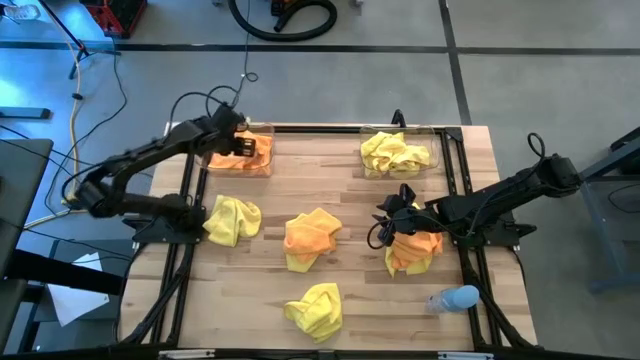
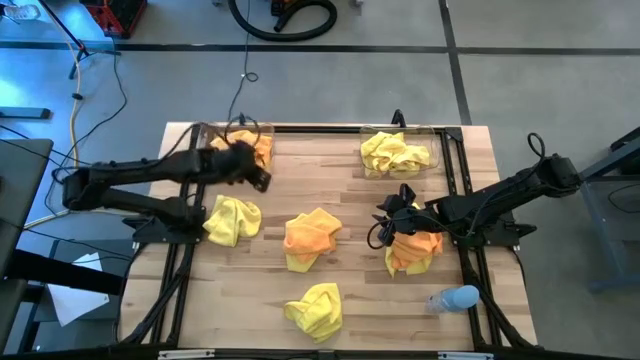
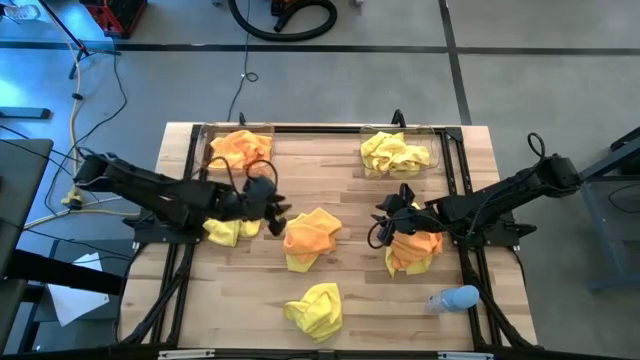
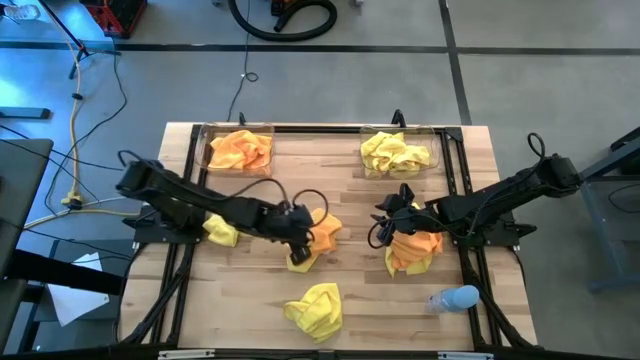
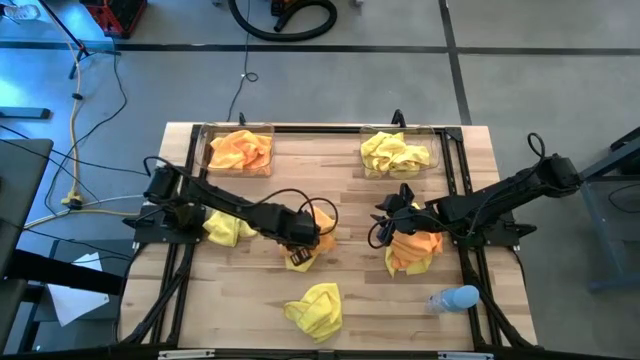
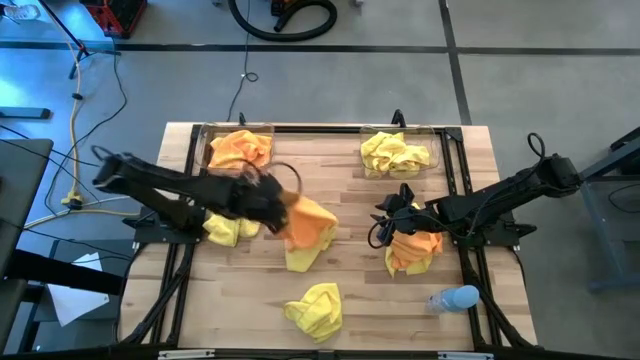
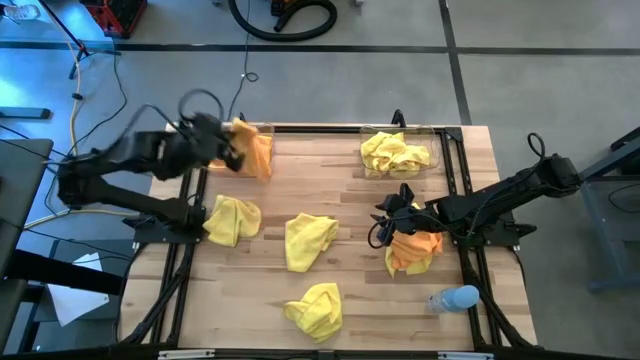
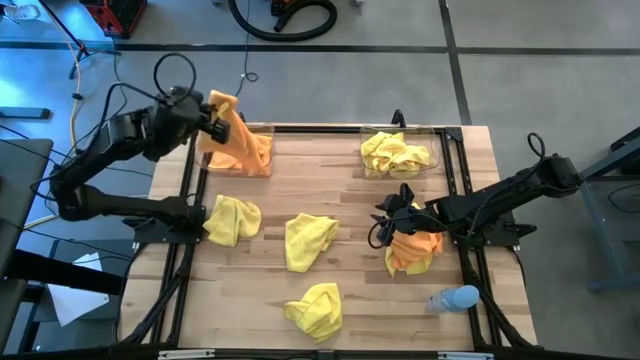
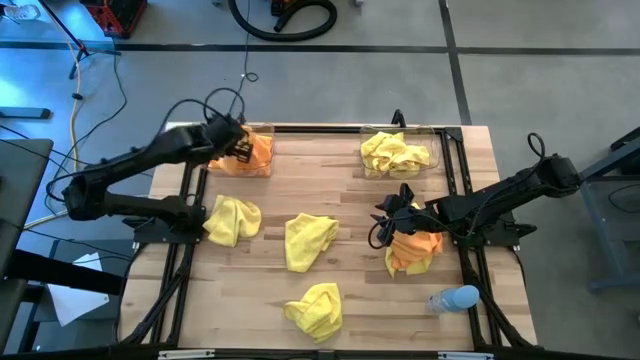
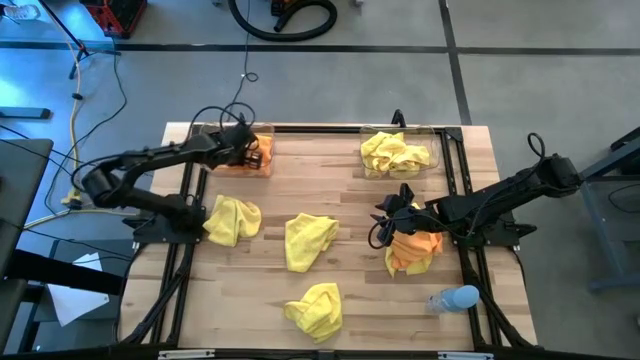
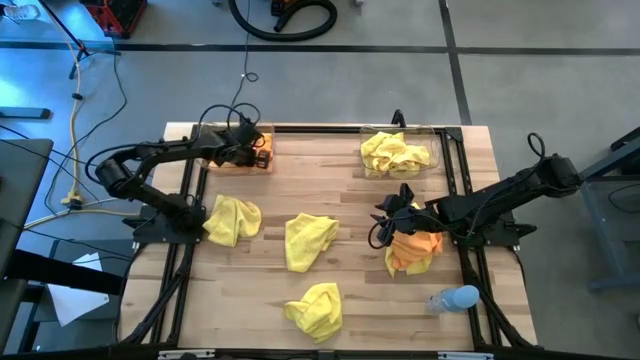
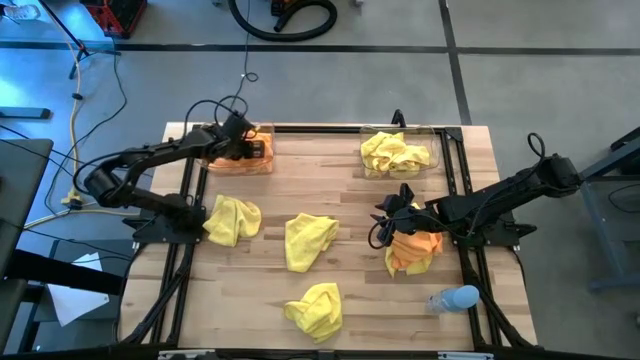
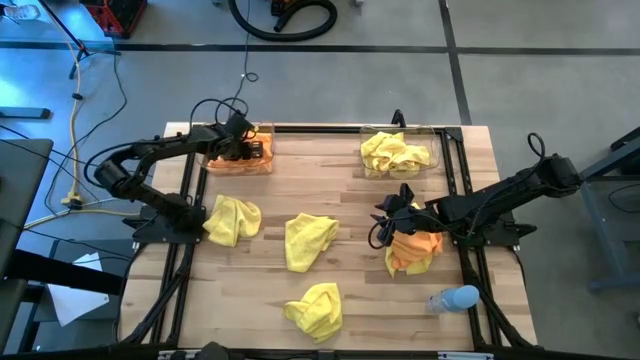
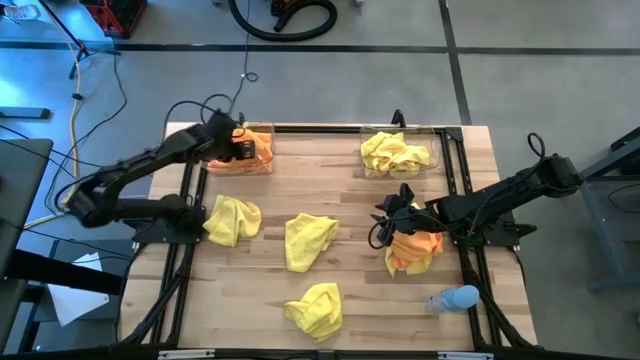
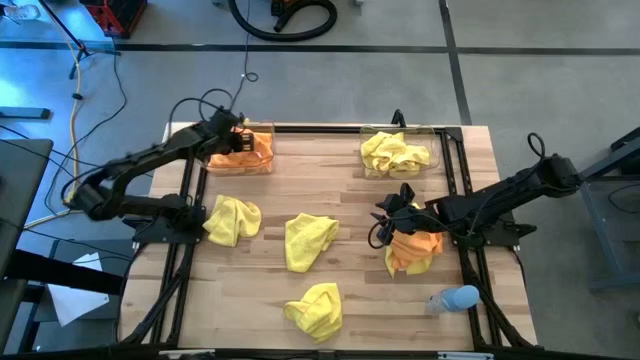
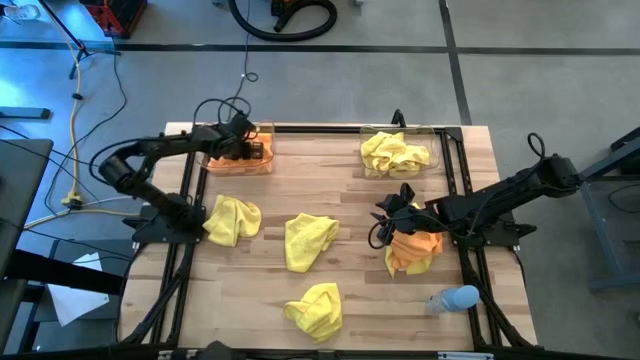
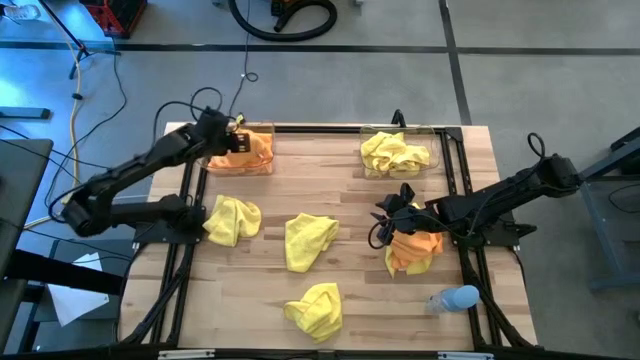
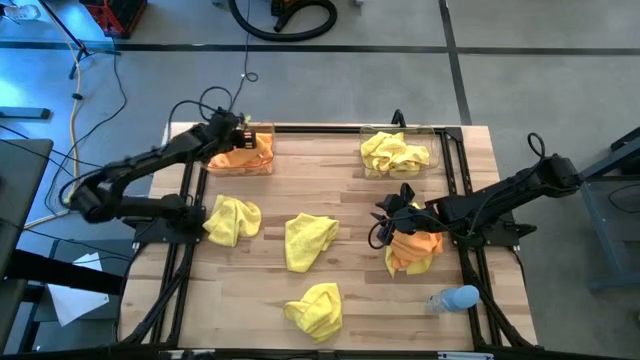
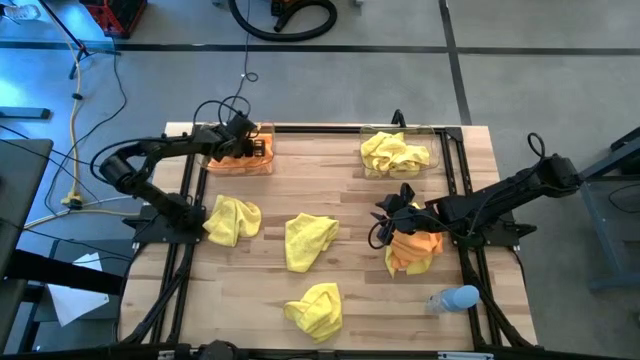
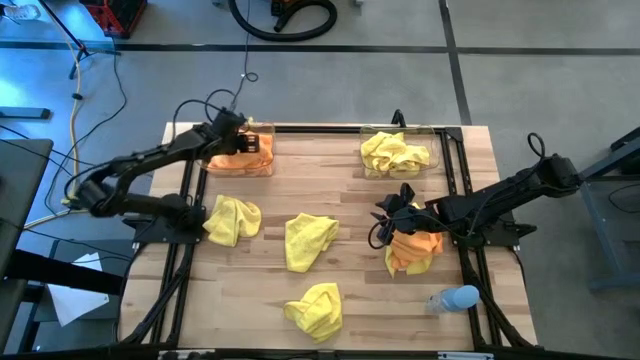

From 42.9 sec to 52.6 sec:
Task: Sort microfiber towel by color & place in baskets
Put the left orange microfiber cloth into the left transparent bin

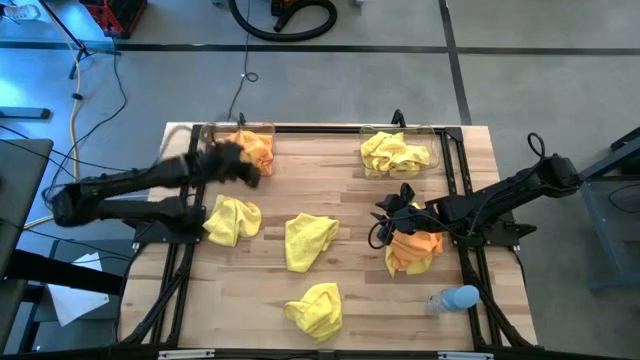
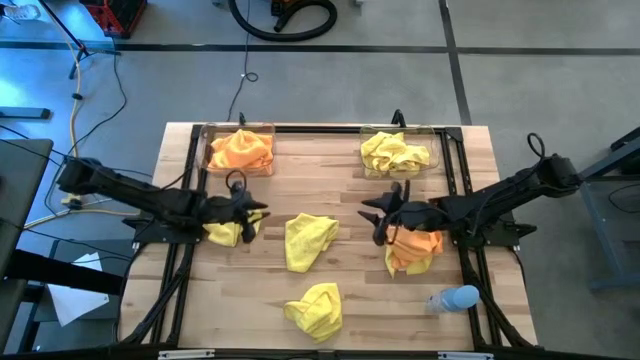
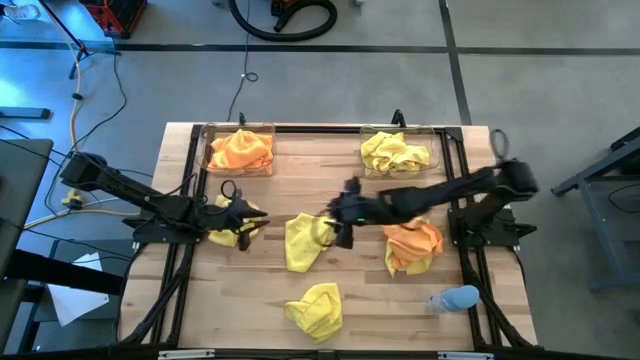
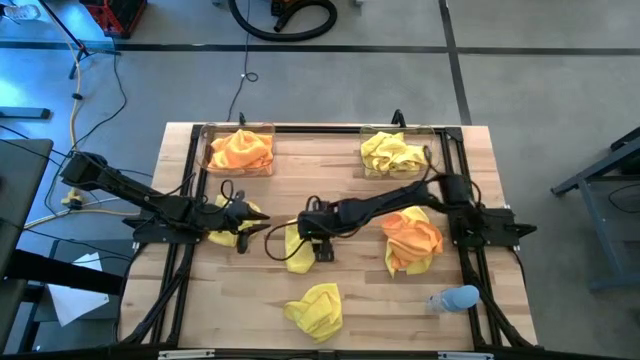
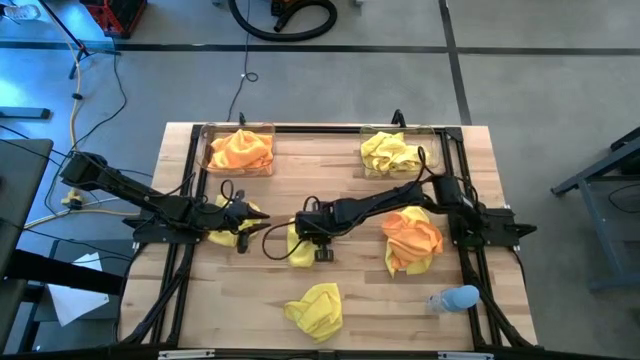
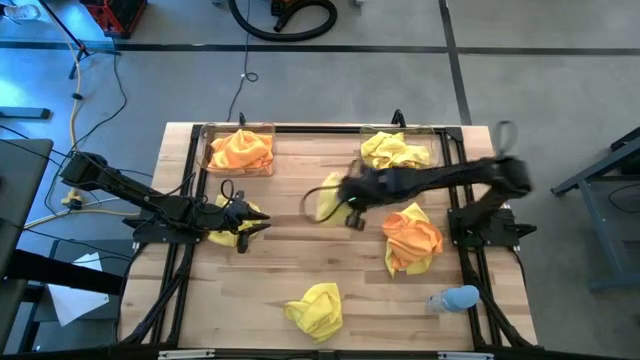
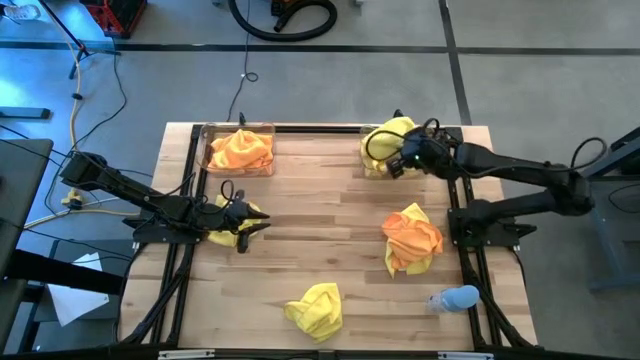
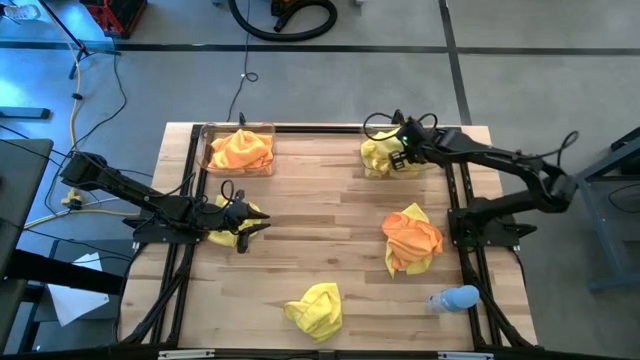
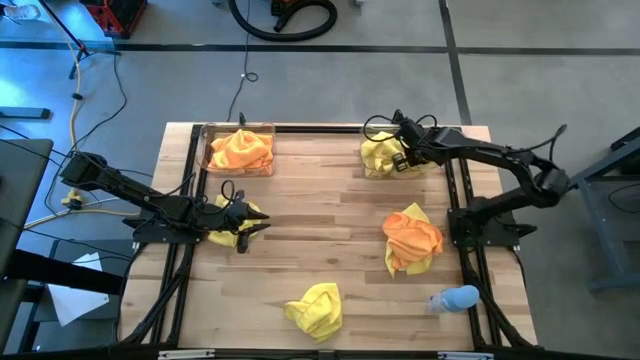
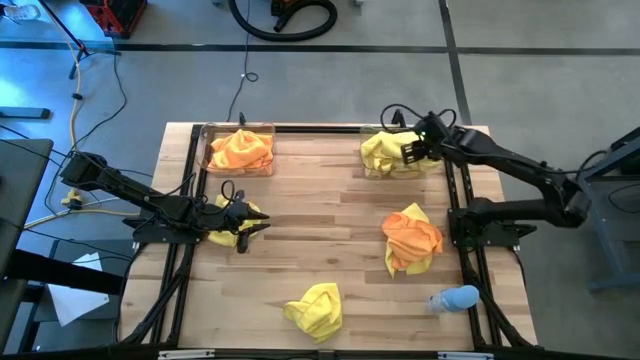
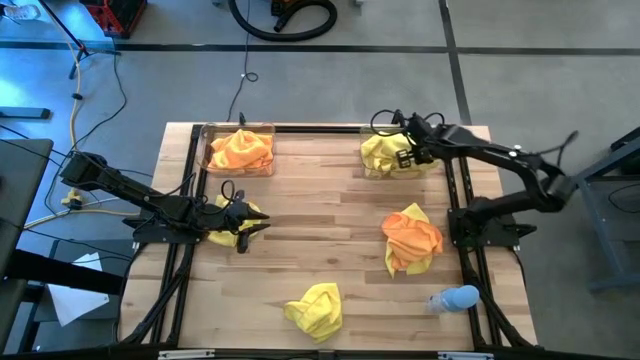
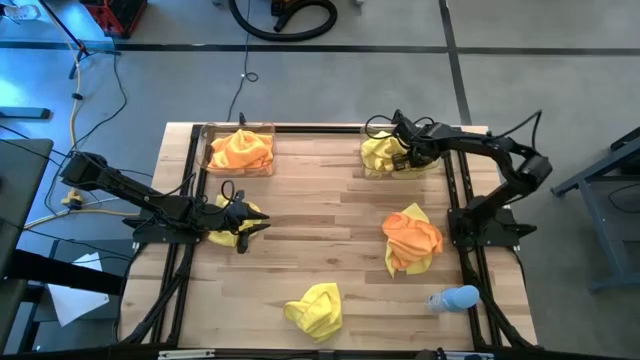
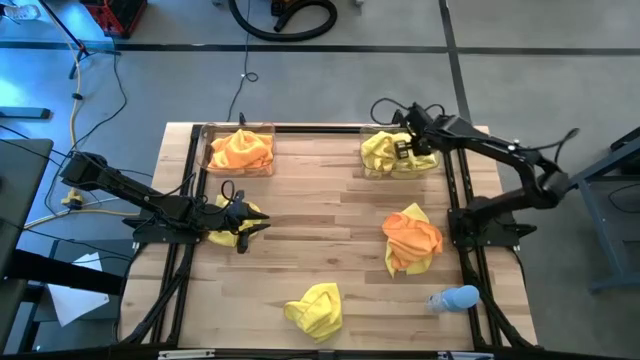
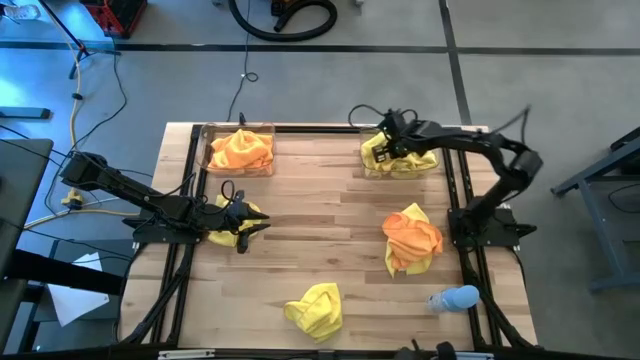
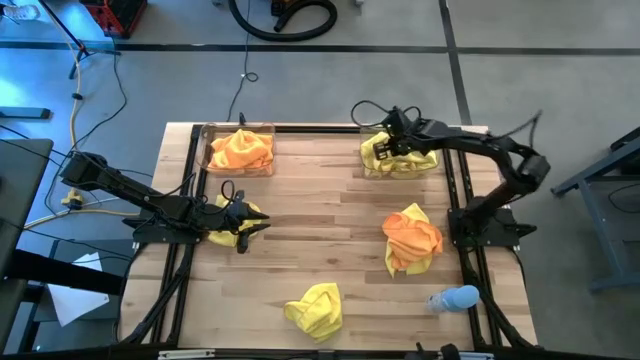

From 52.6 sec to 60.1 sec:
Put the top center yellow microfiber cloth into the right transparent bin

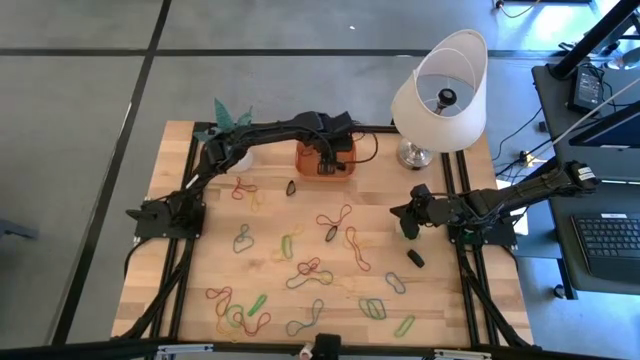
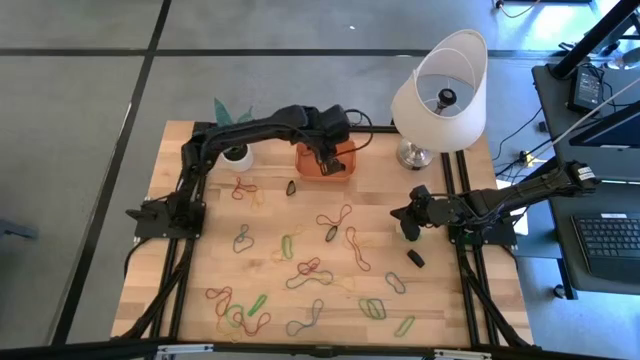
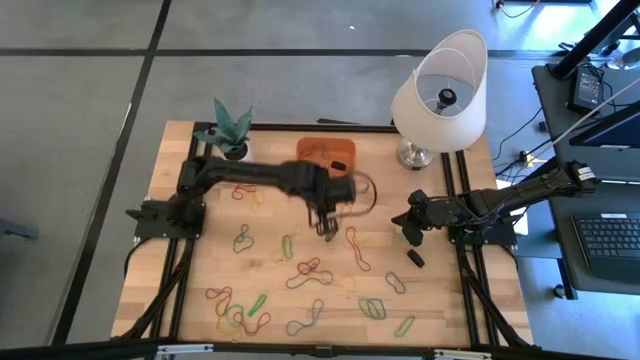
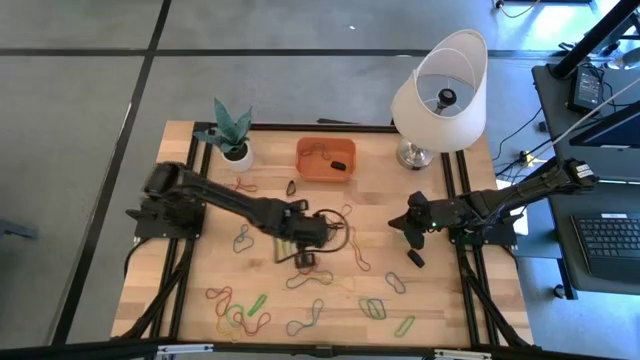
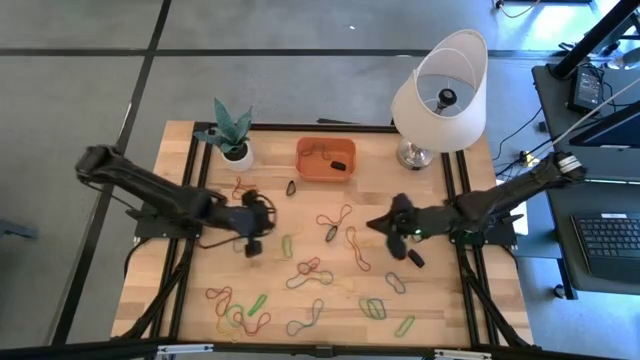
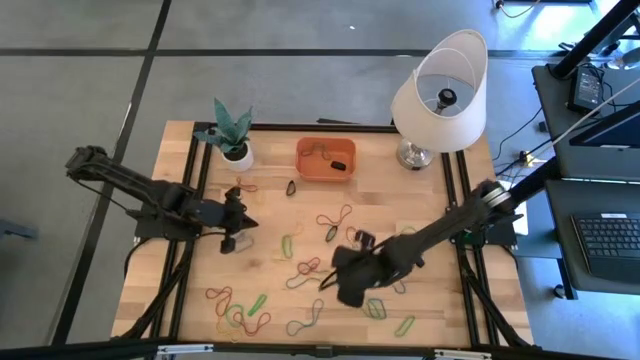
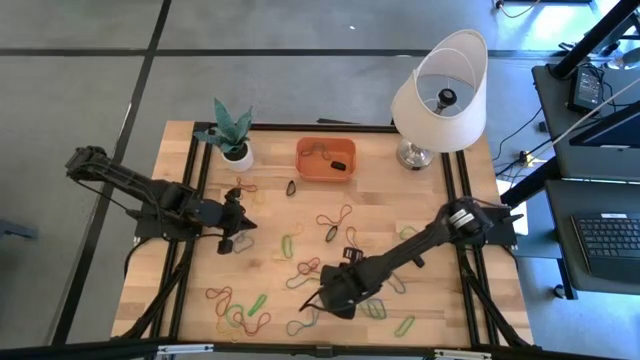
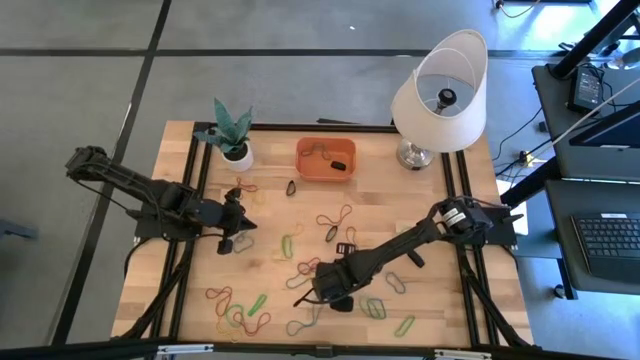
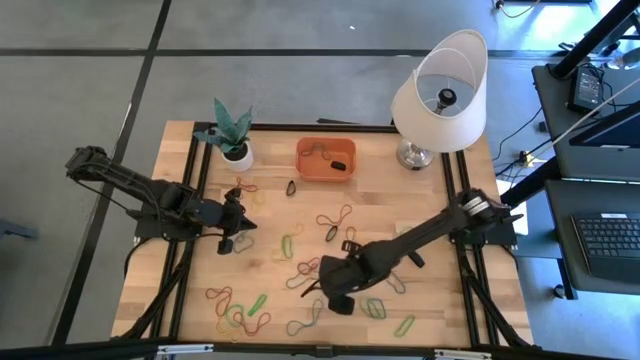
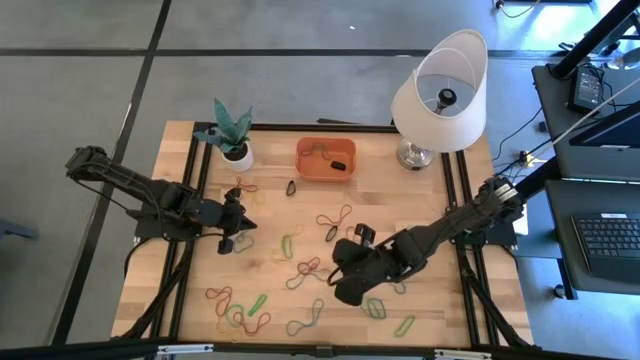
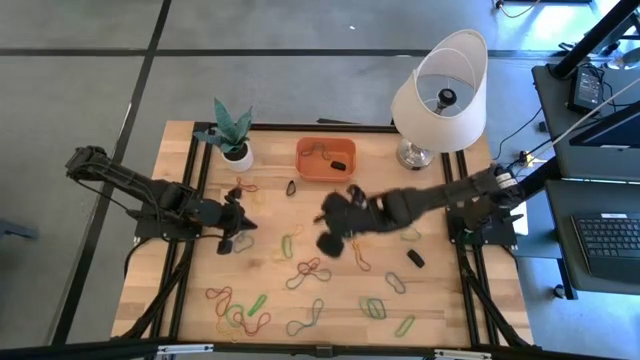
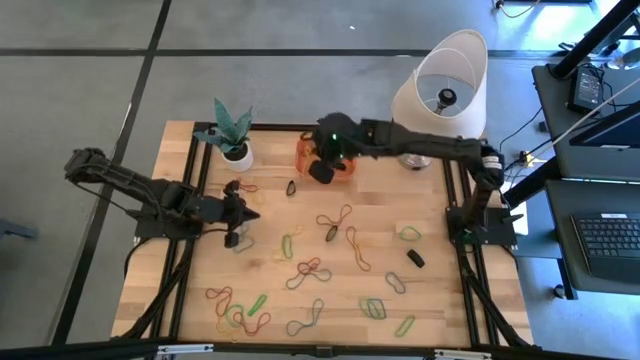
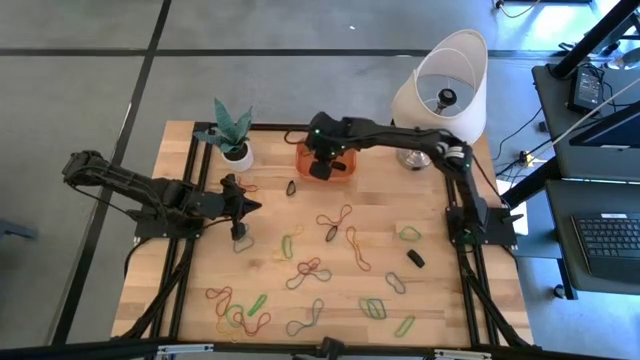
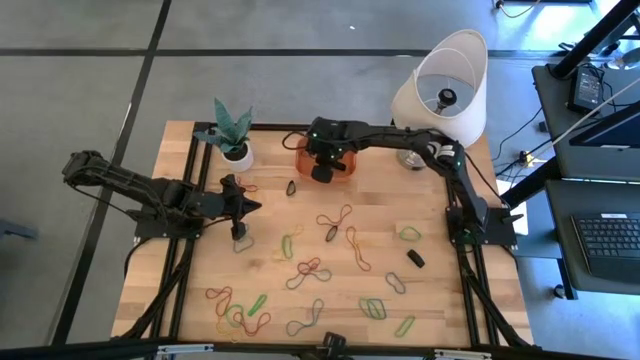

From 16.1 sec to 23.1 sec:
Task: Pick and place rubber bands into bin
Put the yellow rubber band into the bin
